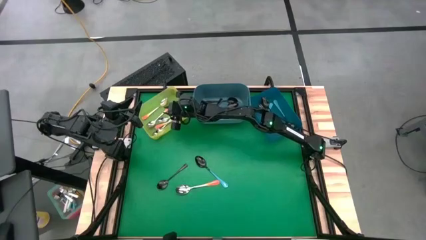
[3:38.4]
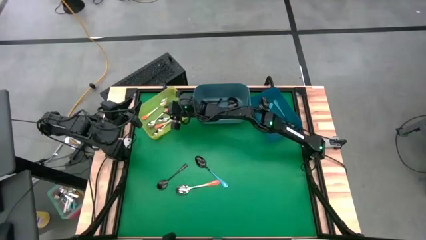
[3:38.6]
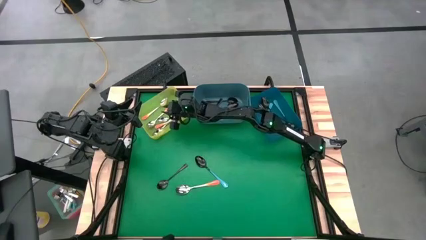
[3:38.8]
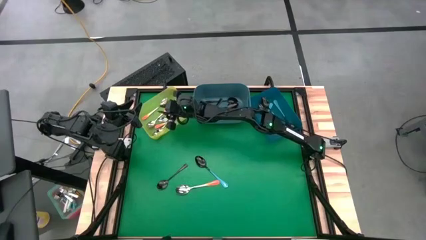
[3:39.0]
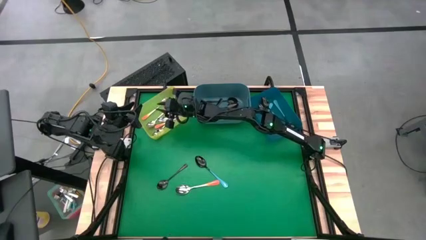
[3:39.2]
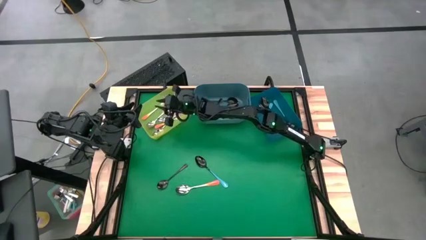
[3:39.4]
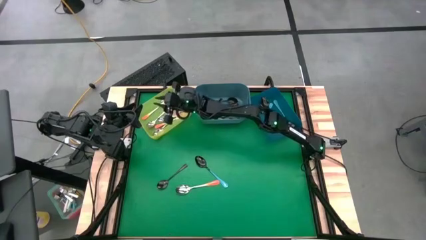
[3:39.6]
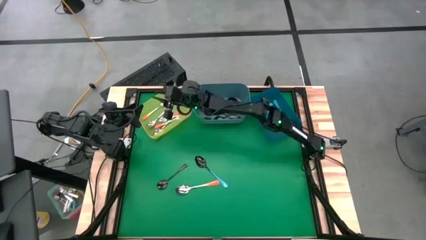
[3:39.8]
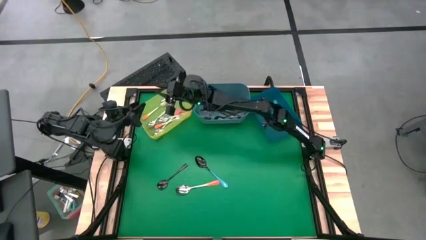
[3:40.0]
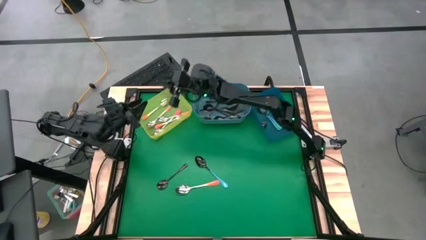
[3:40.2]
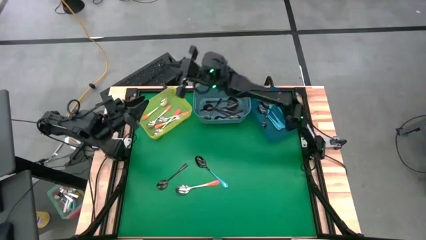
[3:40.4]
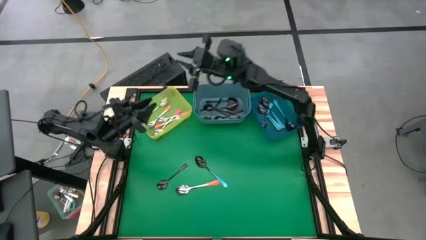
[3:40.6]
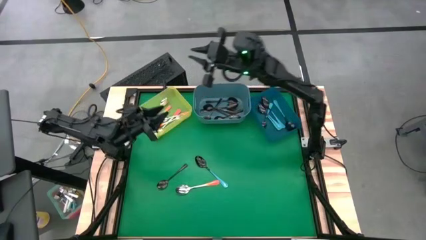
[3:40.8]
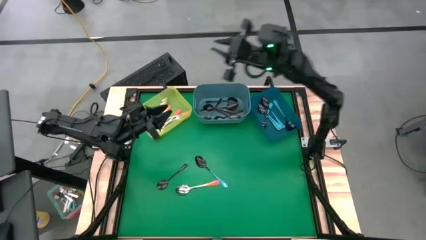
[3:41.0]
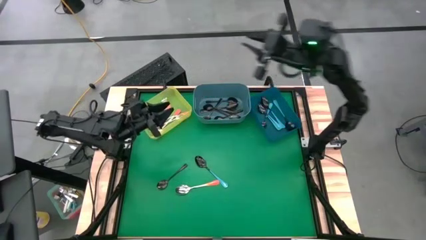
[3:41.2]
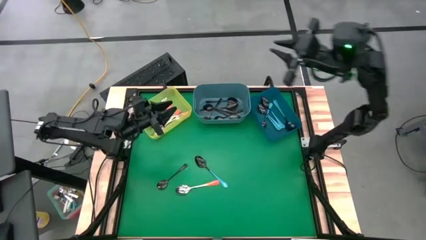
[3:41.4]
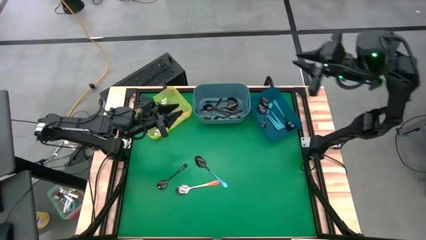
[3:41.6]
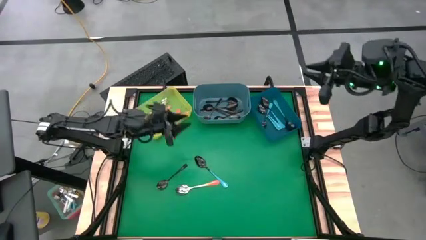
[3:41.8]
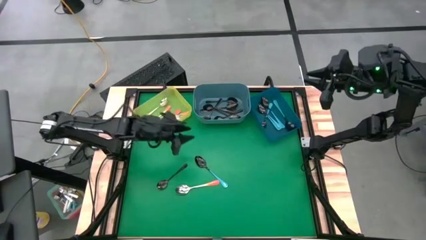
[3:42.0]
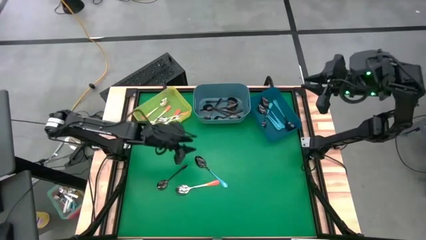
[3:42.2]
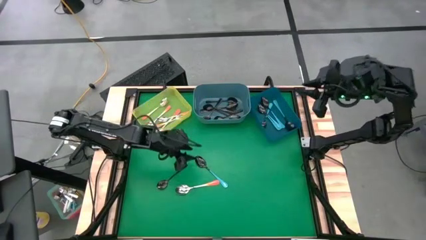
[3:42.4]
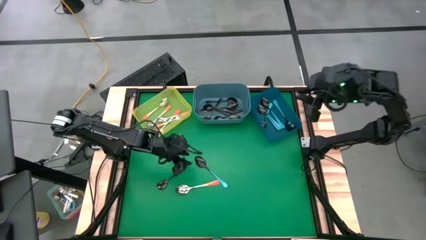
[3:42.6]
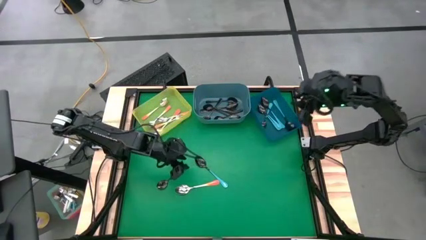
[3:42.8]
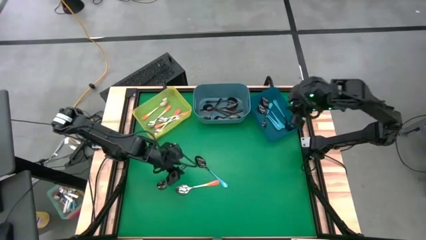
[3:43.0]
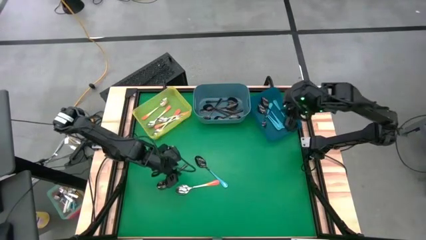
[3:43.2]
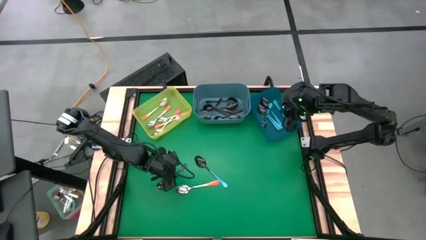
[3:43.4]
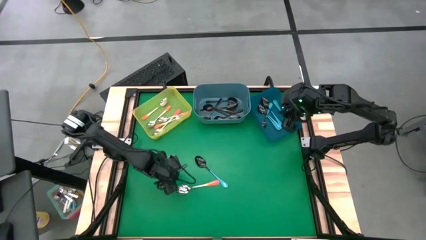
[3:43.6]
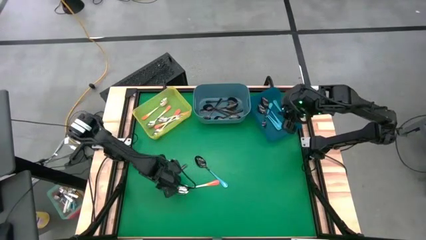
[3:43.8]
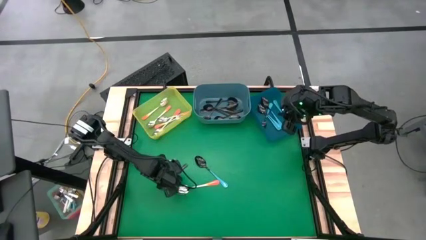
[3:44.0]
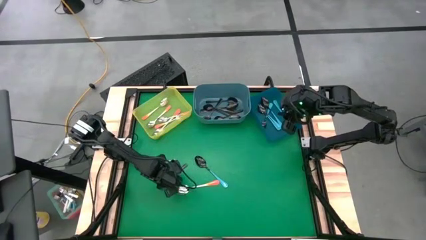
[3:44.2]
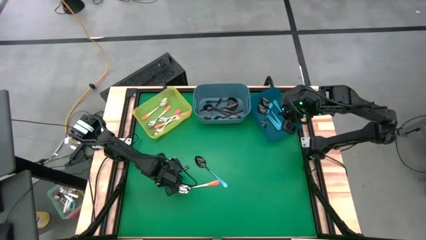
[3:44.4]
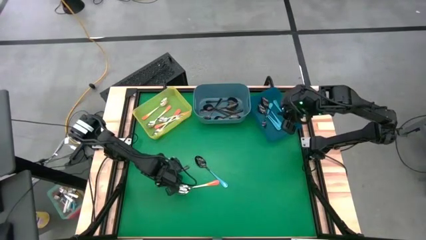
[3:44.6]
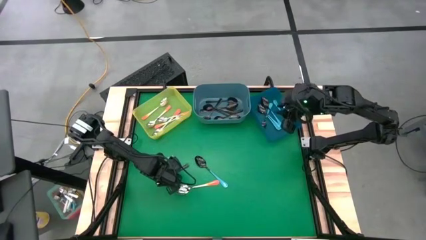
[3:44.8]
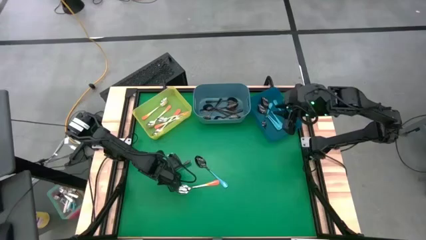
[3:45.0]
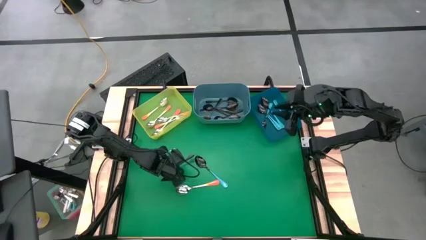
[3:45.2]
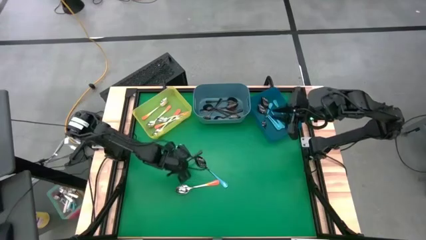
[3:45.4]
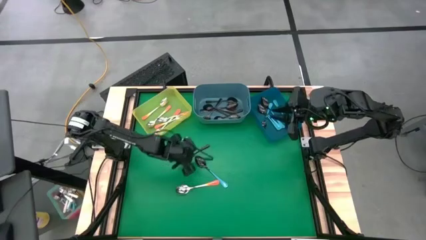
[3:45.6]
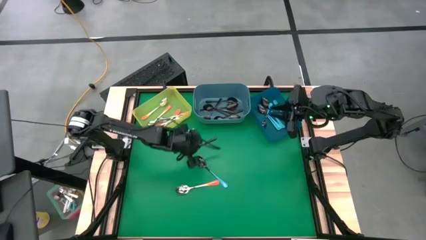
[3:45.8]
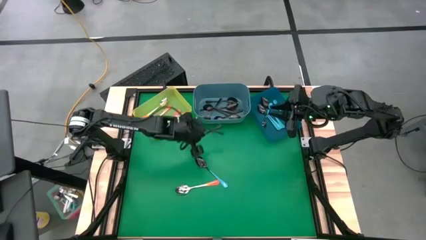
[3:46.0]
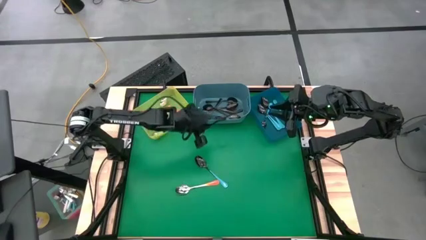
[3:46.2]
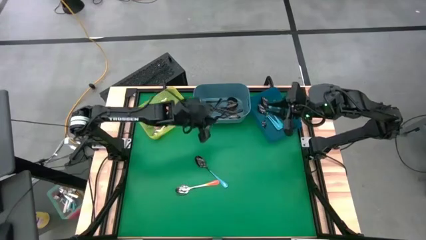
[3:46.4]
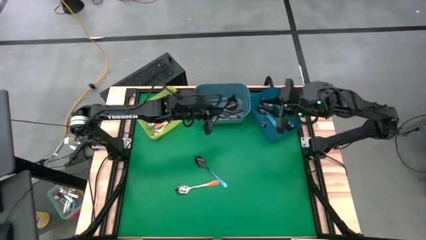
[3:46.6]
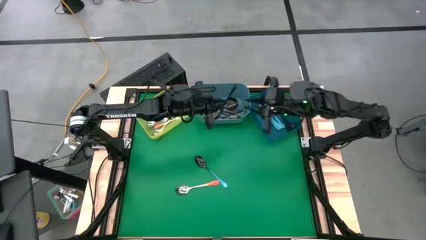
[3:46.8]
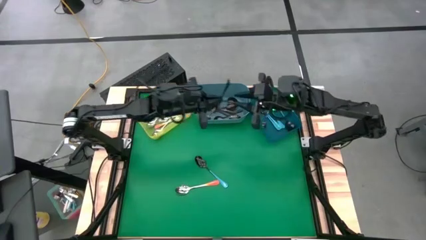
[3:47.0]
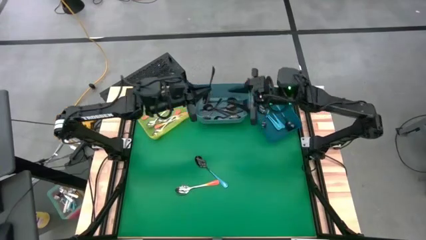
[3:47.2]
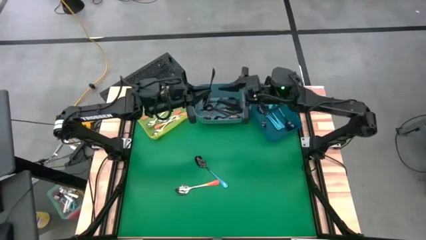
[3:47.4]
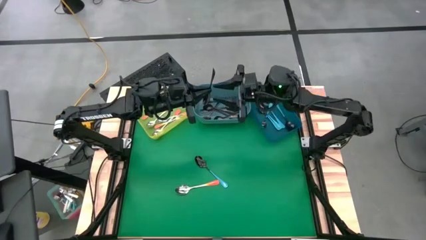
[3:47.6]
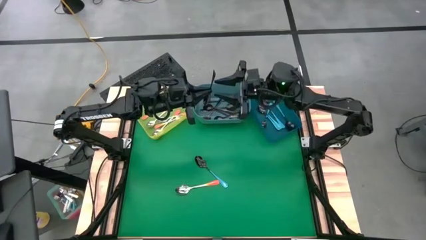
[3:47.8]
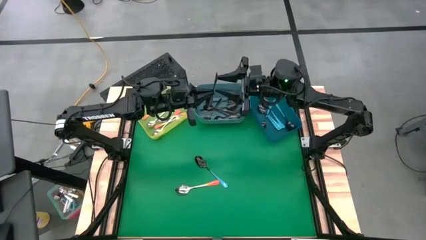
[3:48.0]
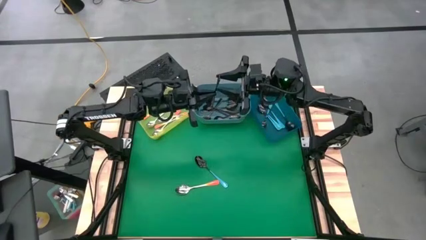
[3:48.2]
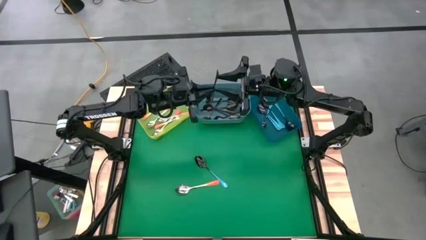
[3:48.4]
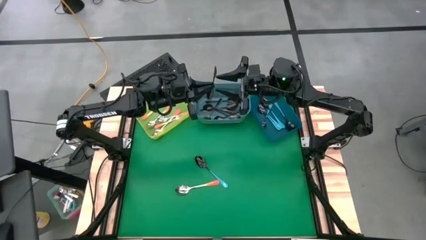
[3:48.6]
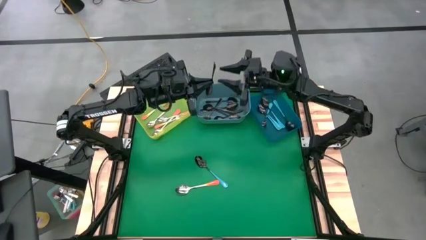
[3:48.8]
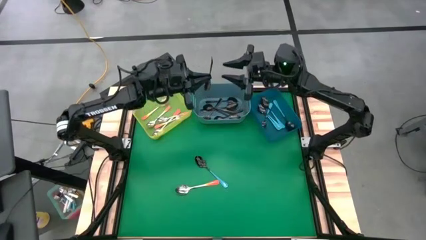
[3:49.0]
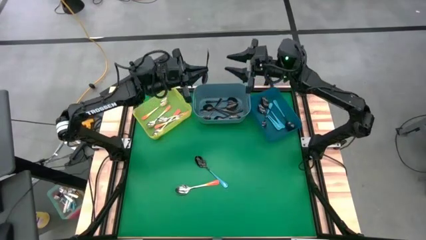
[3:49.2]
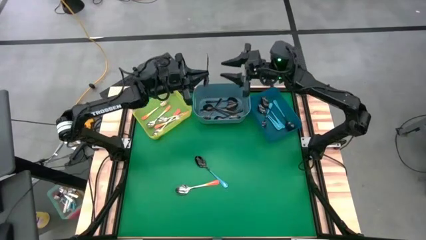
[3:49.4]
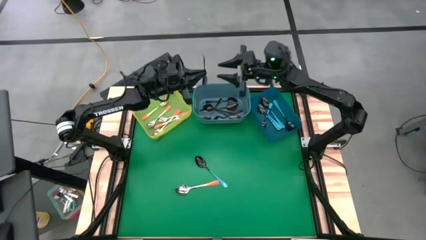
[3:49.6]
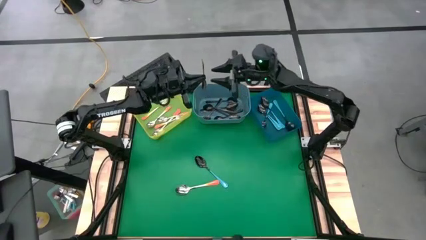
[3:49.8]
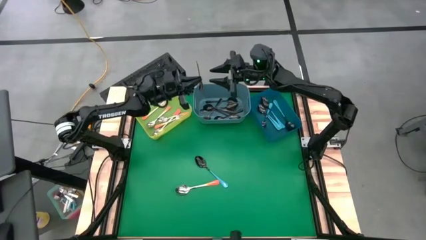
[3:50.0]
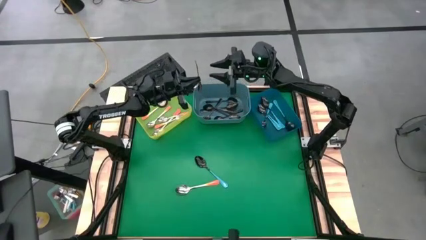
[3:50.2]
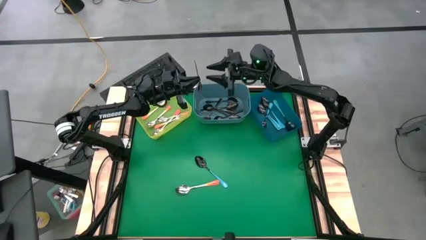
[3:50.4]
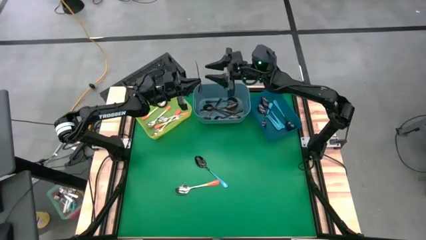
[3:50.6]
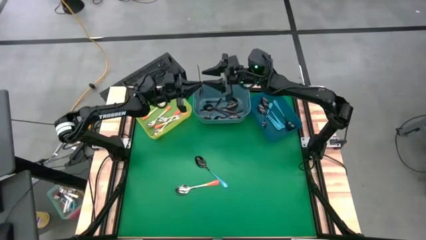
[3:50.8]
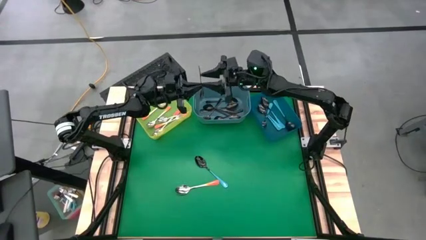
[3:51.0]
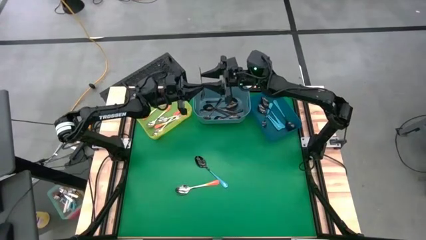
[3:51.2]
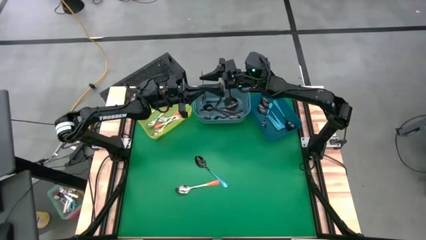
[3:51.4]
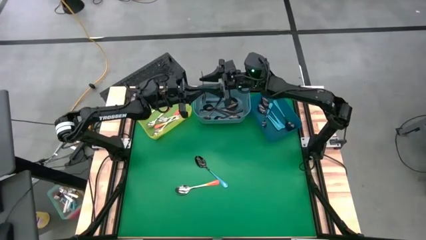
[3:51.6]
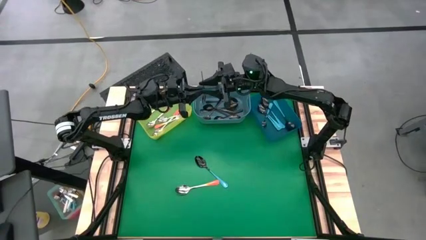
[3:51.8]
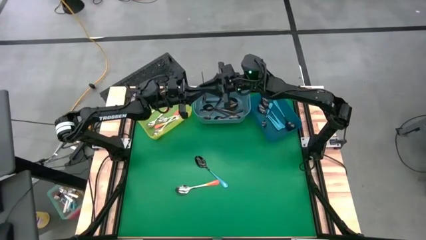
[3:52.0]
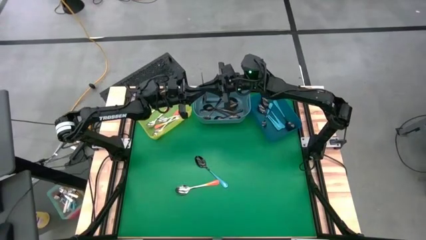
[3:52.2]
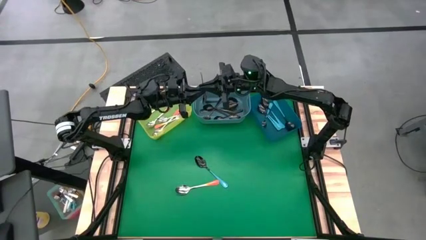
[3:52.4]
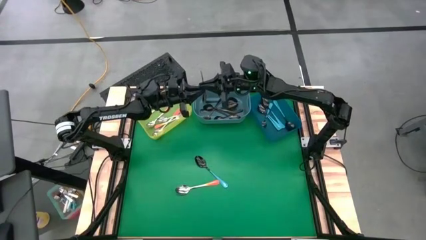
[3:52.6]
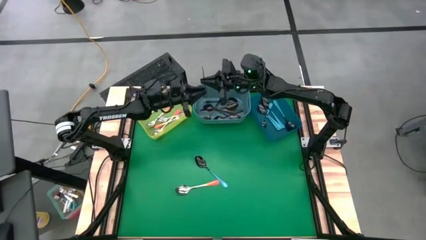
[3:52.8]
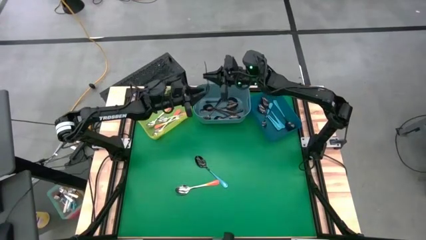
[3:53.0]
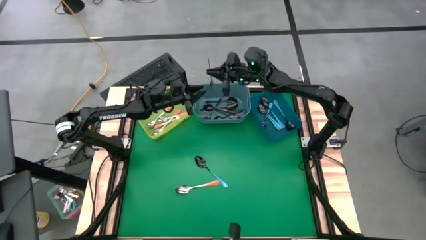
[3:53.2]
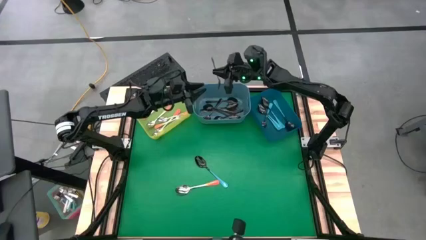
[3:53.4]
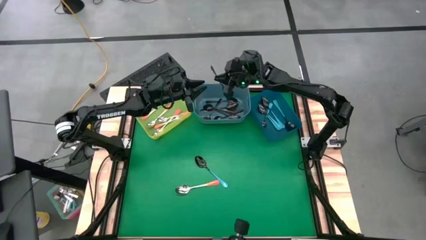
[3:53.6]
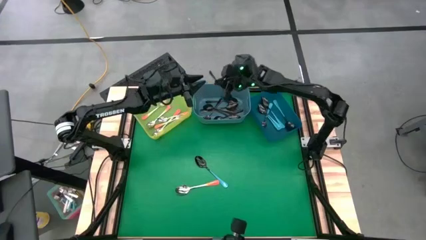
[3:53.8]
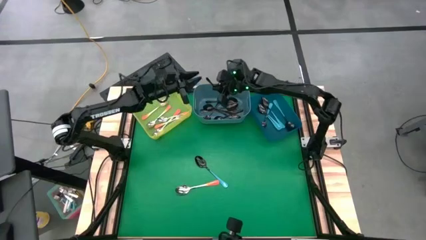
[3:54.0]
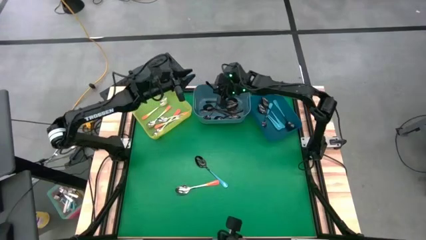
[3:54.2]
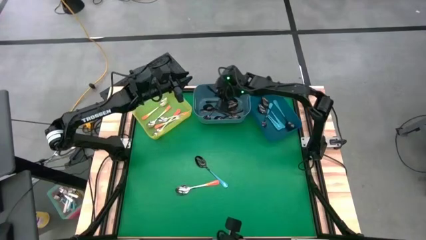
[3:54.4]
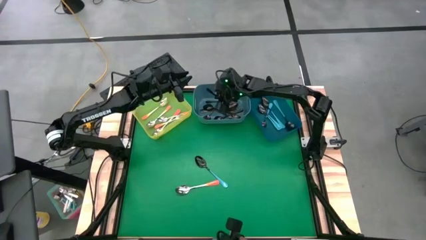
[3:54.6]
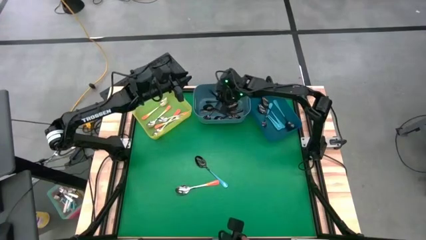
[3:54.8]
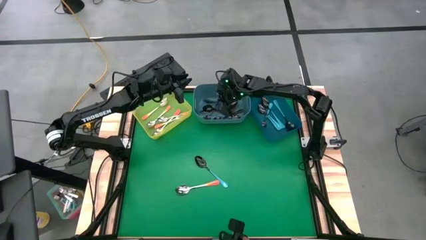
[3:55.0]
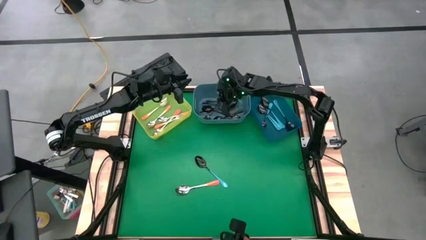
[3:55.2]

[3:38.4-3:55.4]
Task: Sort silverware by color (type)
Put the black spoon into the light blue bin
